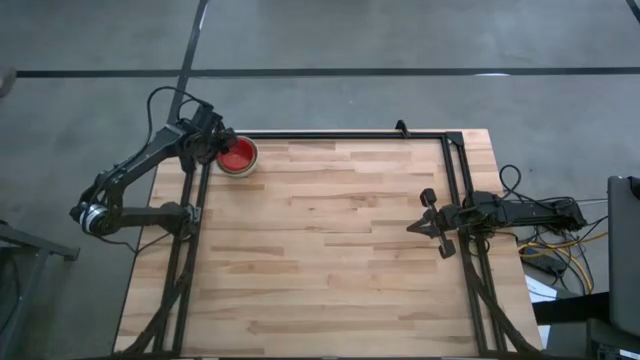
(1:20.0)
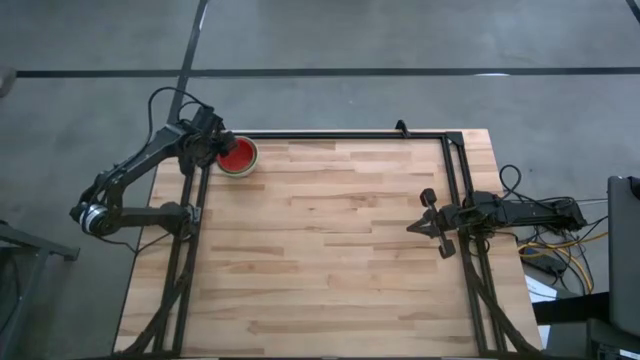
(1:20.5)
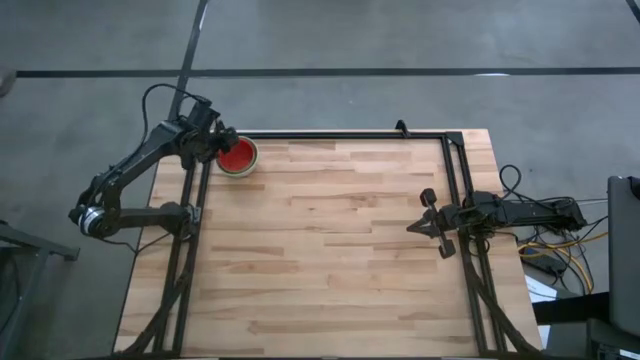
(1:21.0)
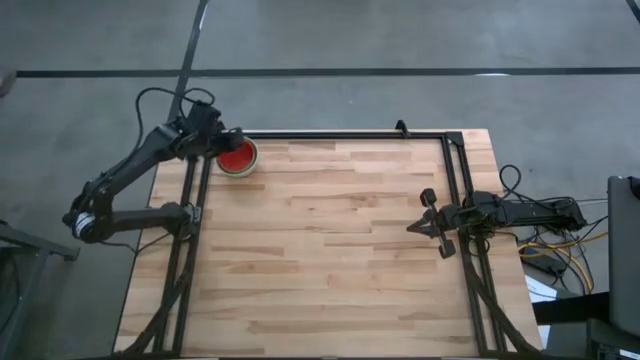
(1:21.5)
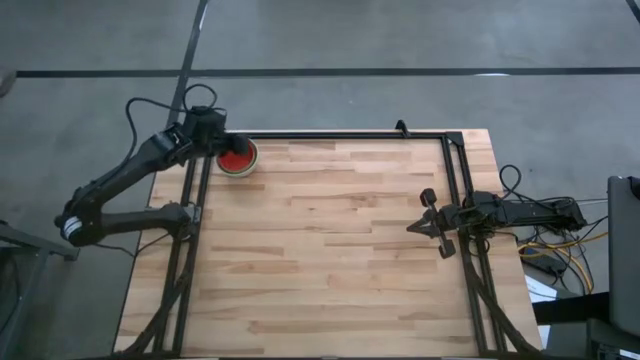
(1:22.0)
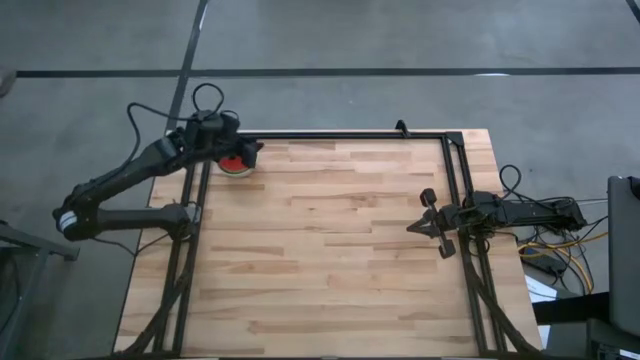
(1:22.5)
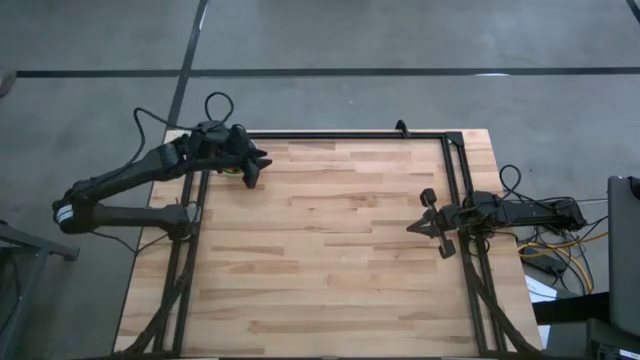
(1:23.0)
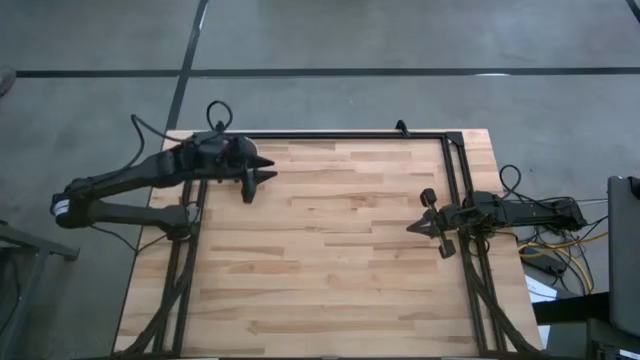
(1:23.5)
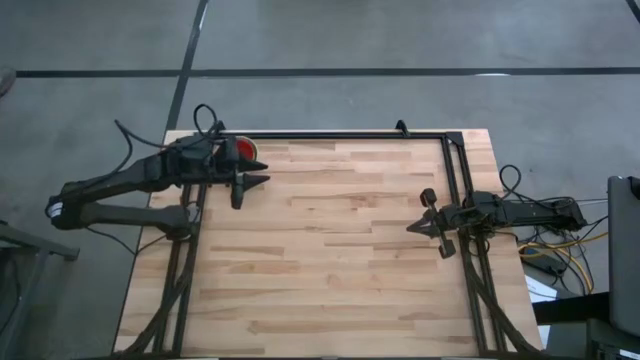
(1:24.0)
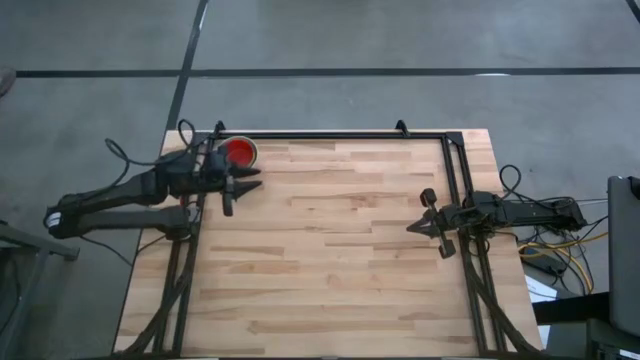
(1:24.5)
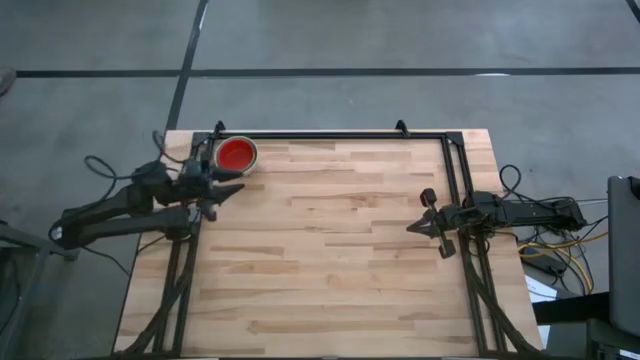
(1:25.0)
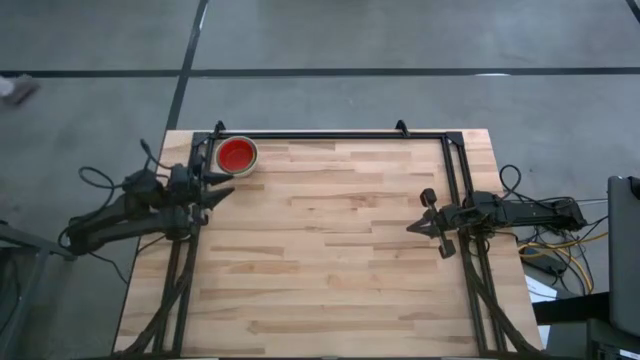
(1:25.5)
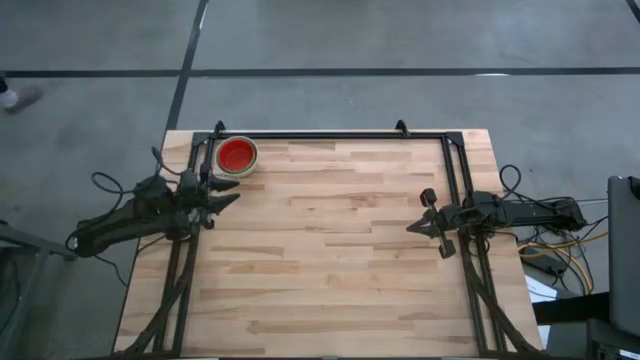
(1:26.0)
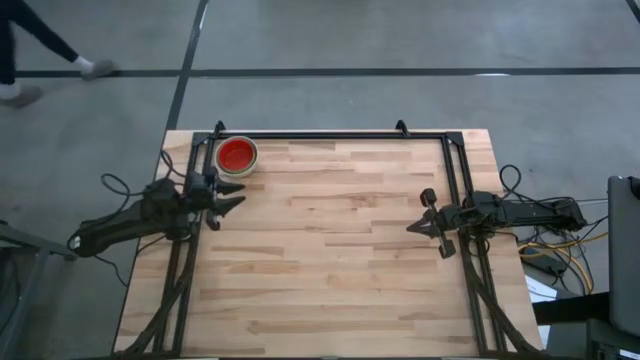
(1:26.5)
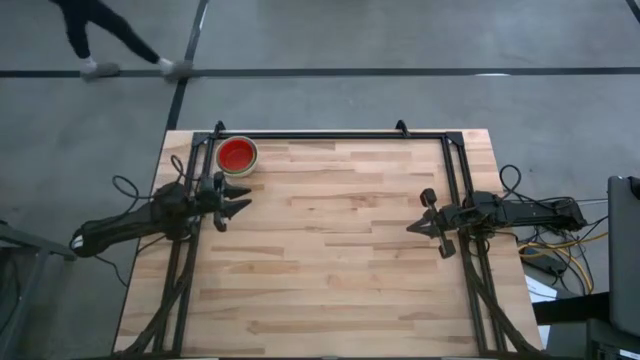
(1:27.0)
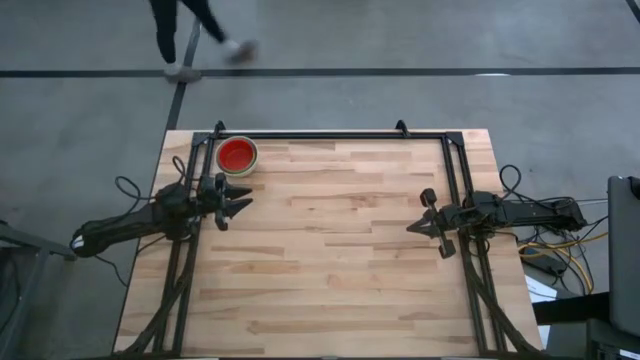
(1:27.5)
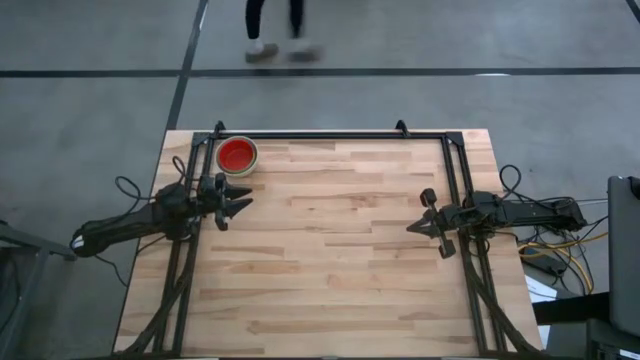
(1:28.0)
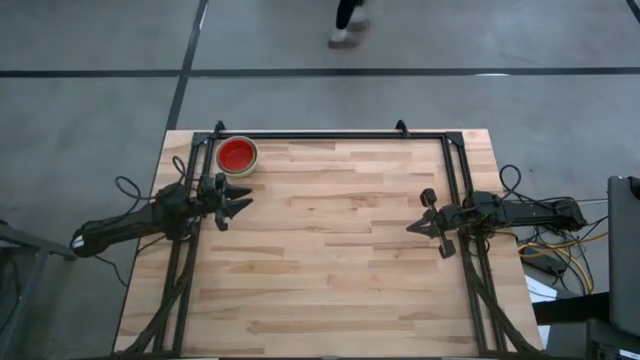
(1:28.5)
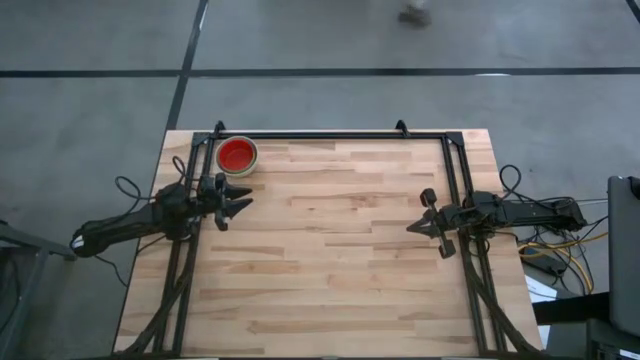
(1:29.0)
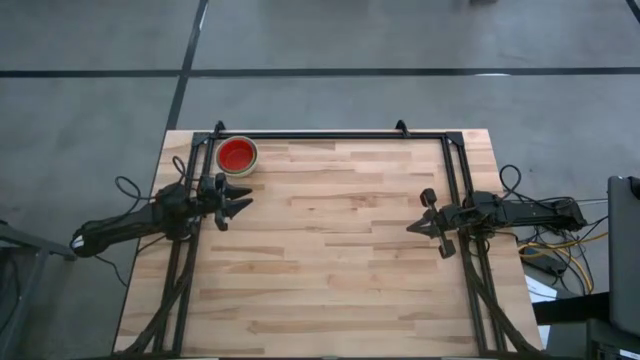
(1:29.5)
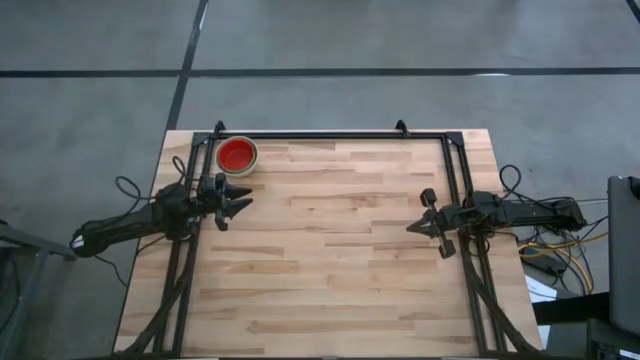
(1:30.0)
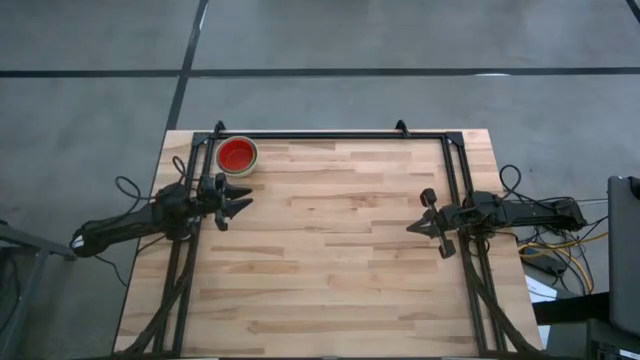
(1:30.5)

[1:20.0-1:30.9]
Return to Home Position

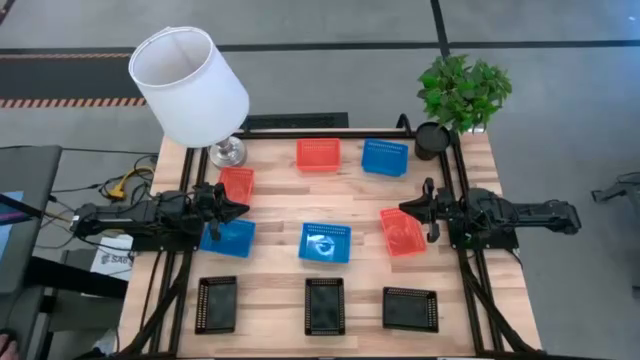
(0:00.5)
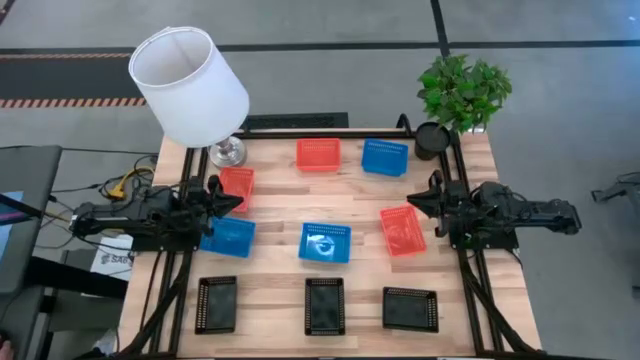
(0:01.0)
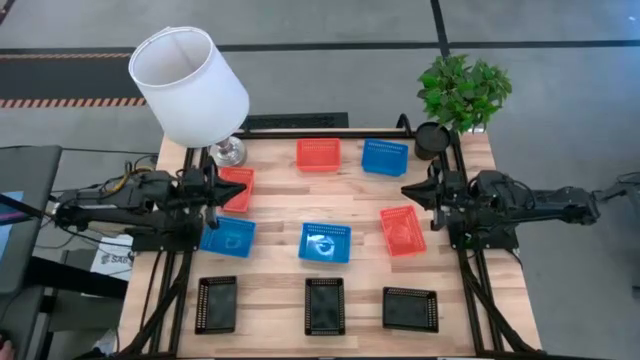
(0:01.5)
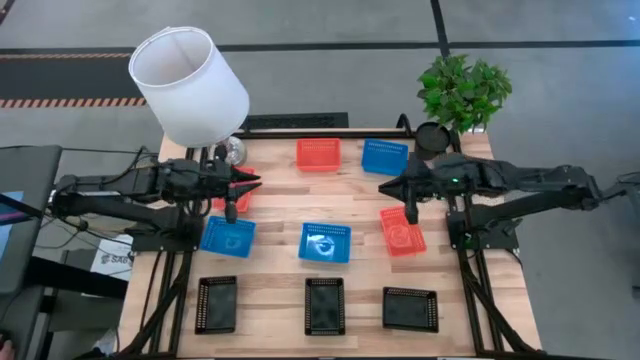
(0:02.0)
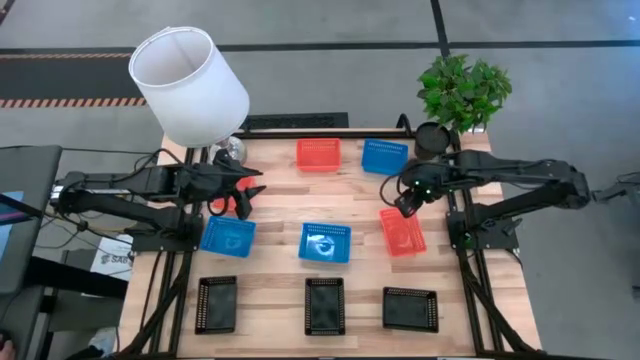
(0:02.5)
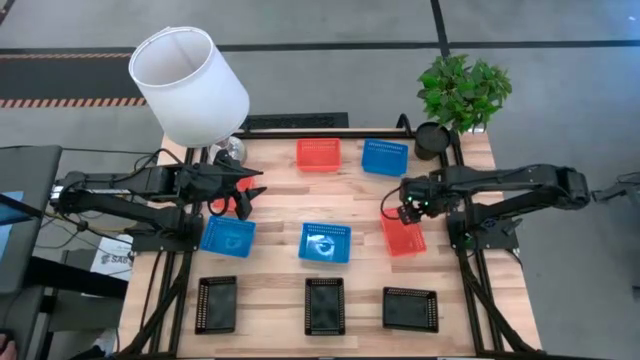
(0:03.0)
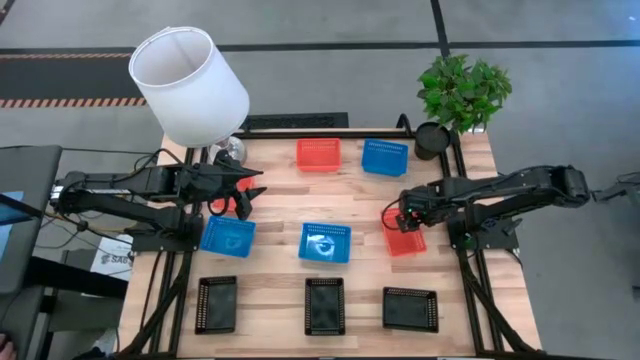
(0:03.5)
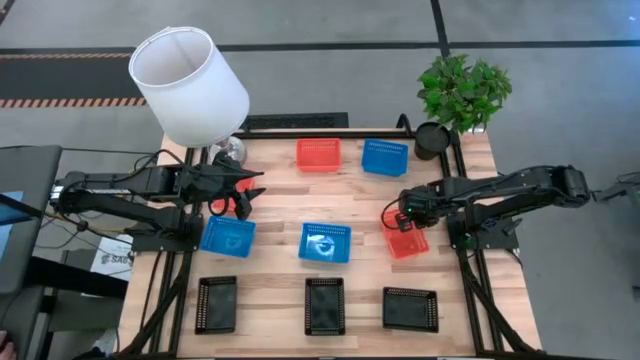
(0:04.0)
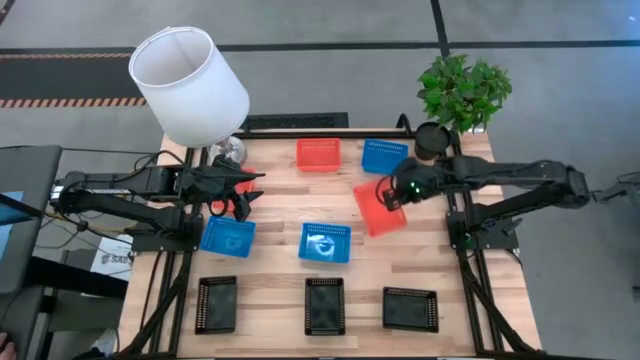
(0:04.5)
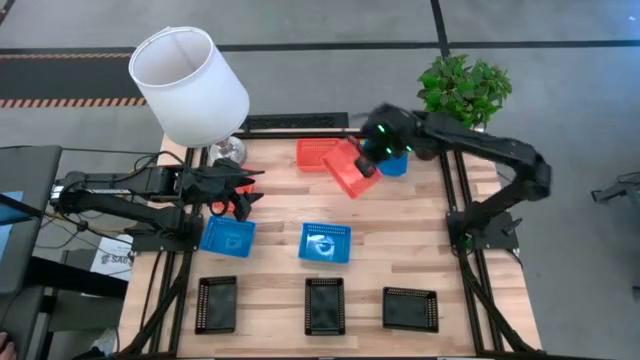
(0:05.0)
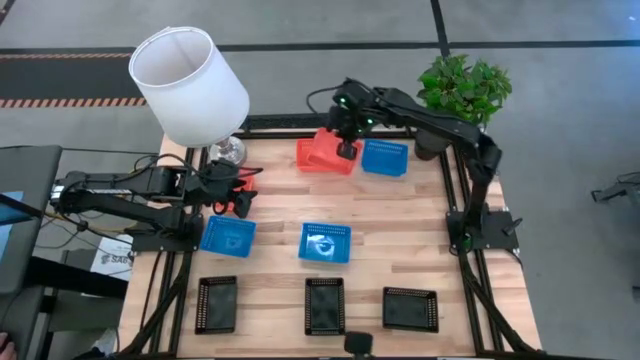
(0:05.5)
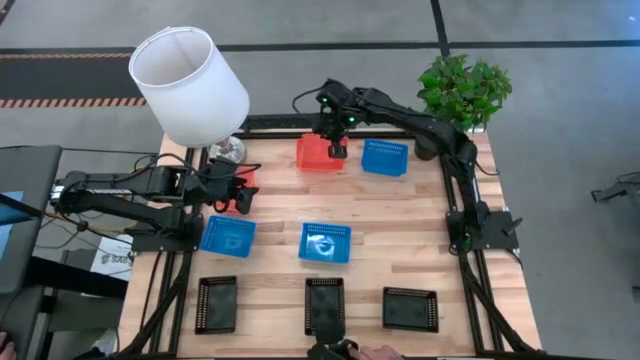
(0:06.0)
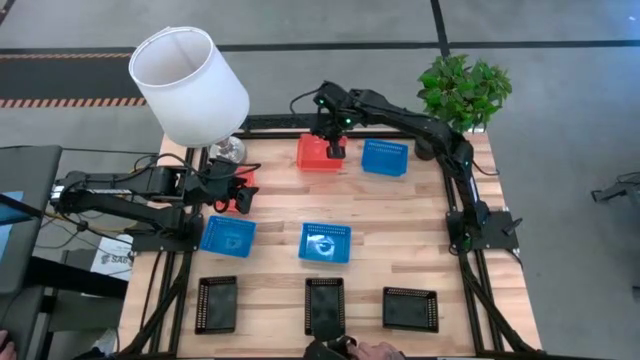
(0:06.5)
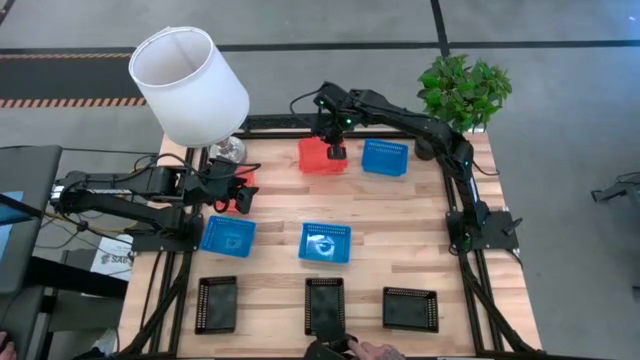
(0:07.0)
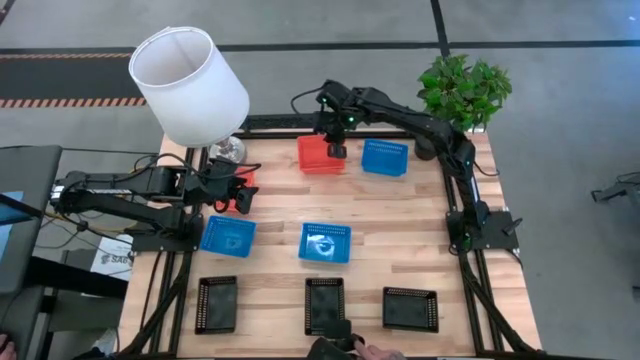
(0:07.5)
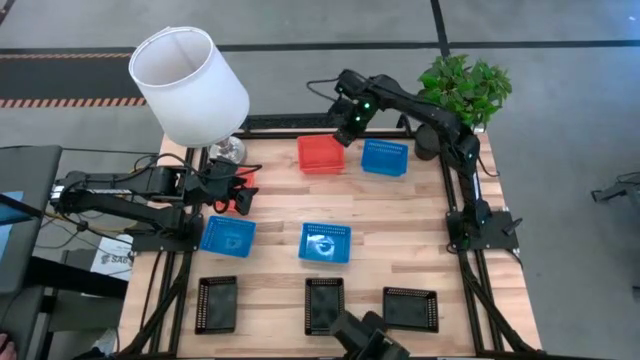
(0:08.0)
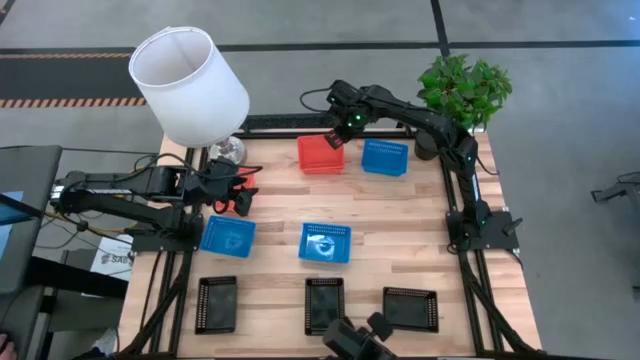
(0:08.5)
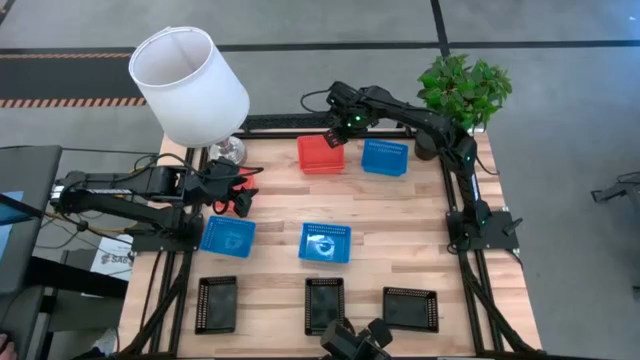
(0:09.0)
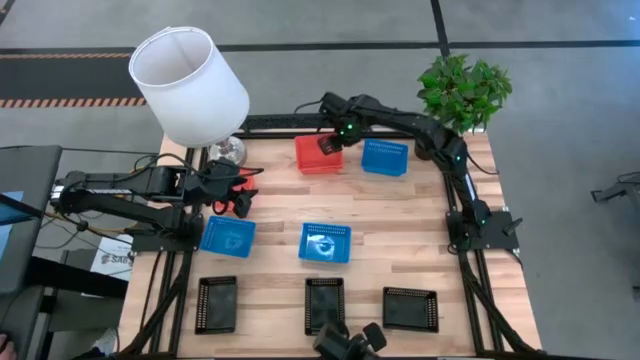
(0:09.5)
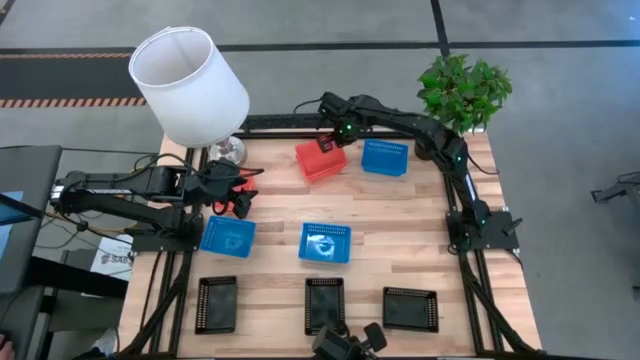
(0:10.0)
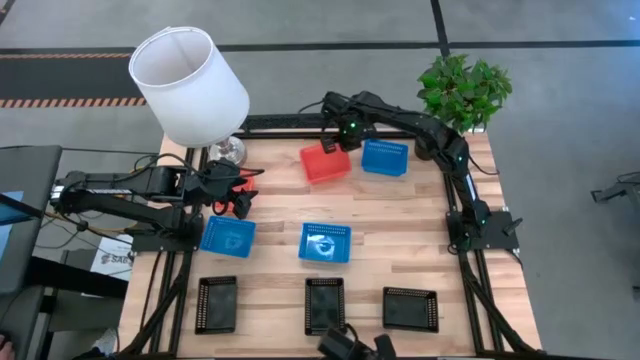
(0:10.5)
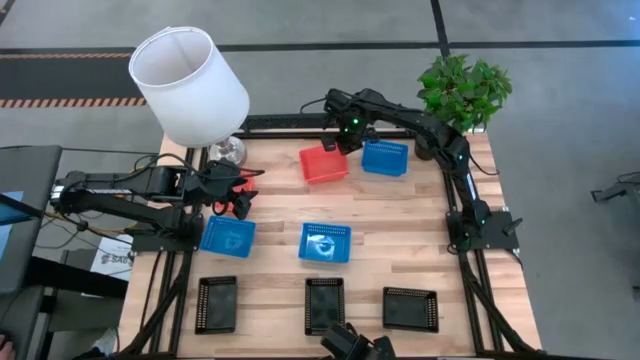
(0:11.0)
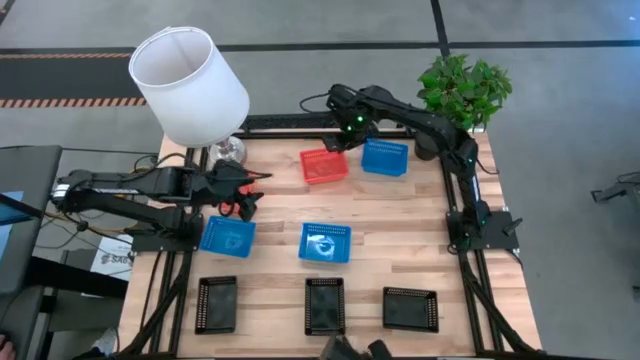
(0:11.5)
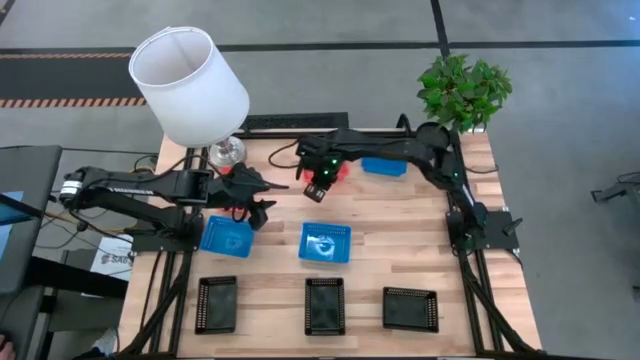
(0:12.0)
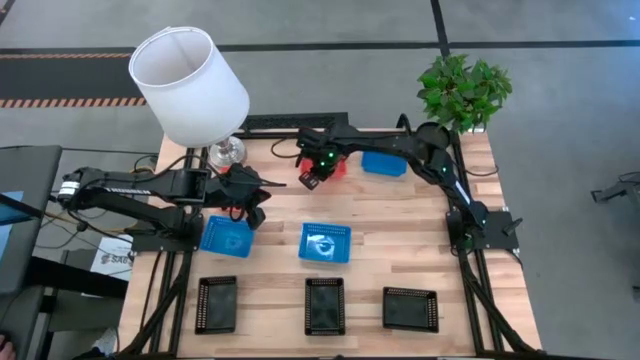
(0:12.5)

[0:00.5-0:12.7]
Stack the bottom orange bin on the top orange bin
